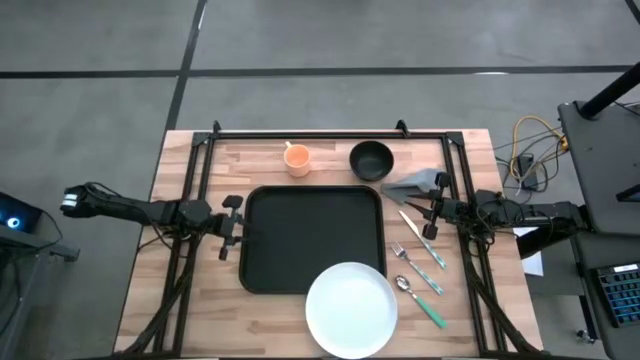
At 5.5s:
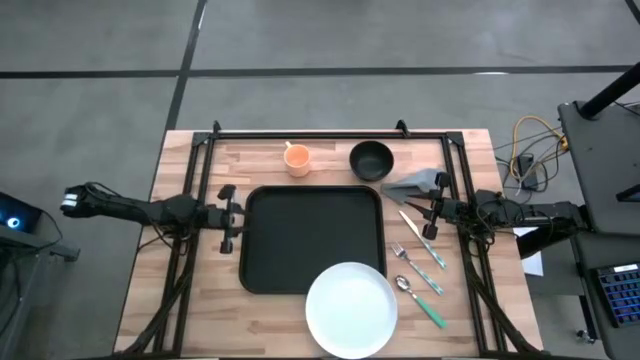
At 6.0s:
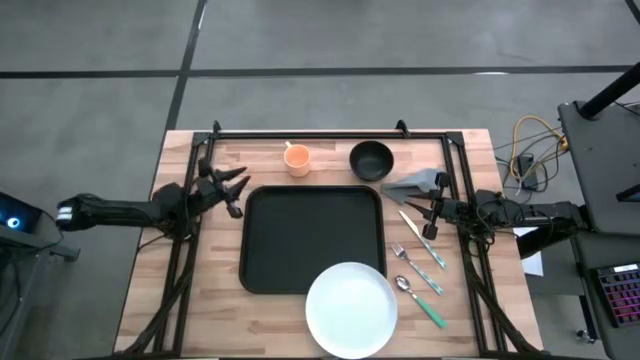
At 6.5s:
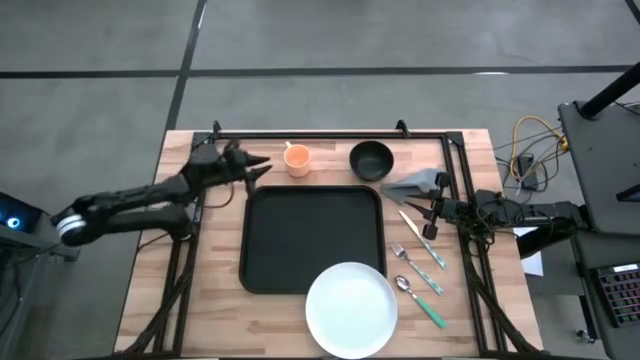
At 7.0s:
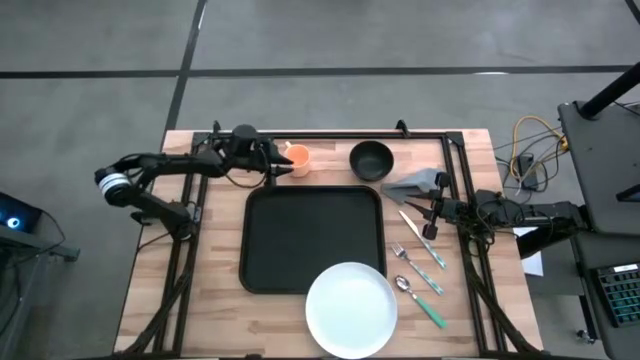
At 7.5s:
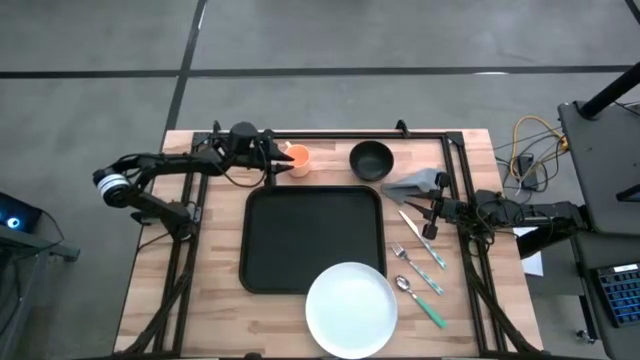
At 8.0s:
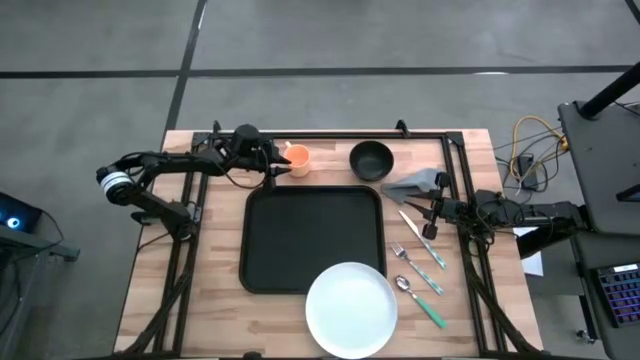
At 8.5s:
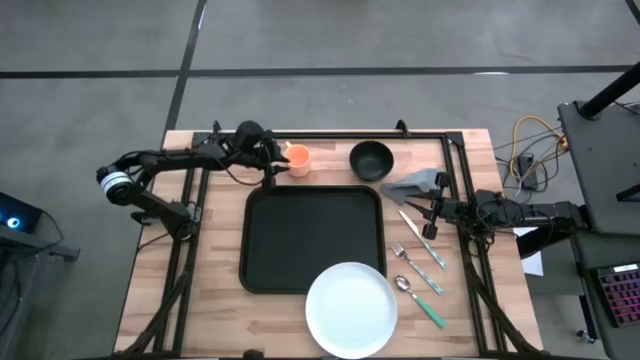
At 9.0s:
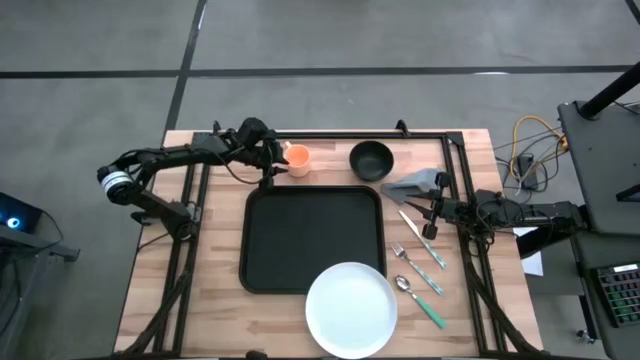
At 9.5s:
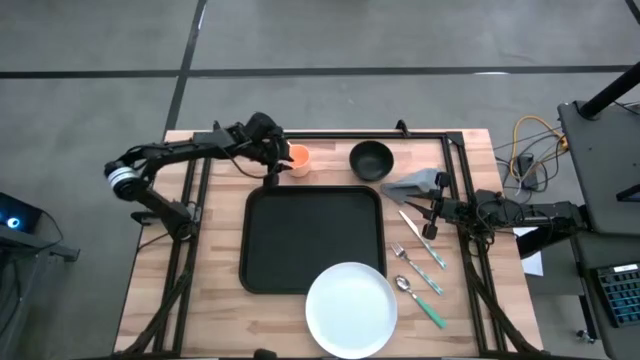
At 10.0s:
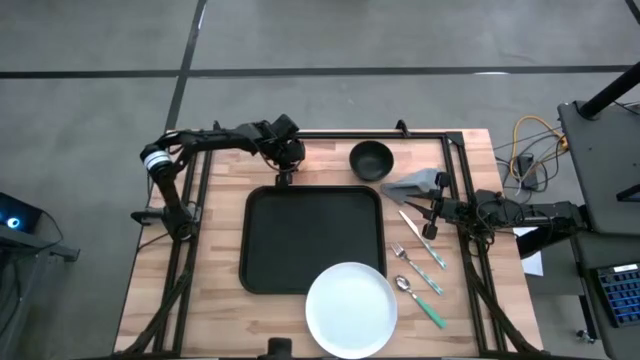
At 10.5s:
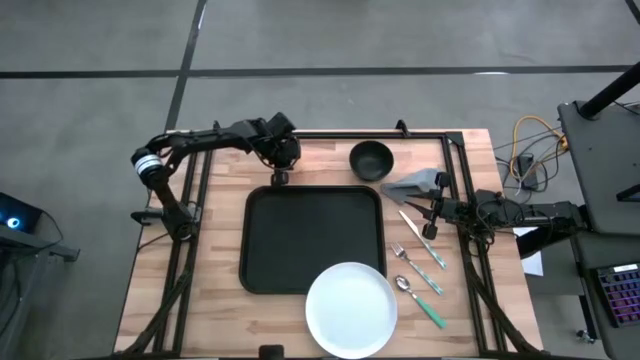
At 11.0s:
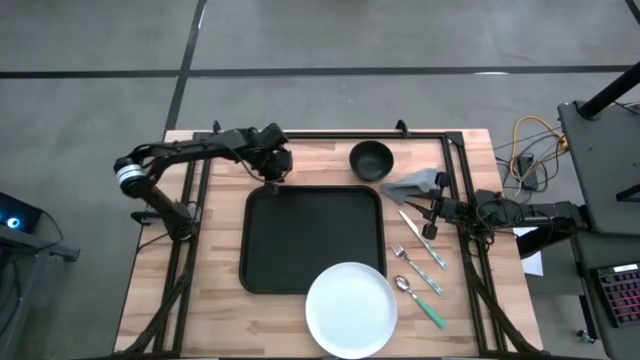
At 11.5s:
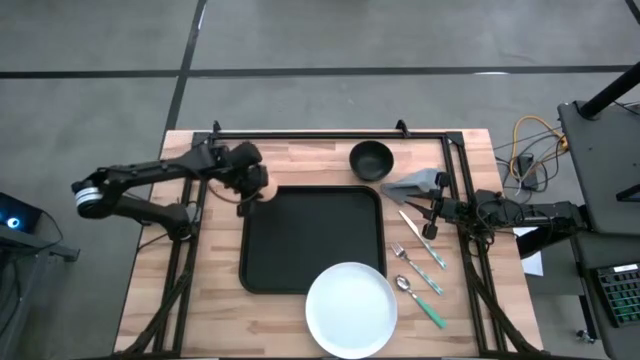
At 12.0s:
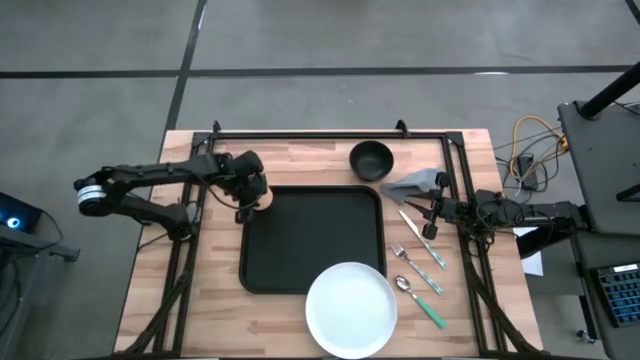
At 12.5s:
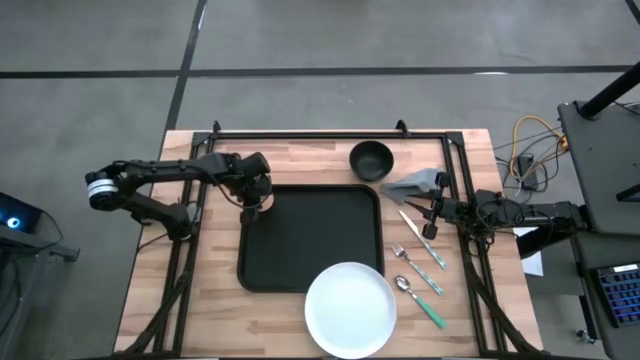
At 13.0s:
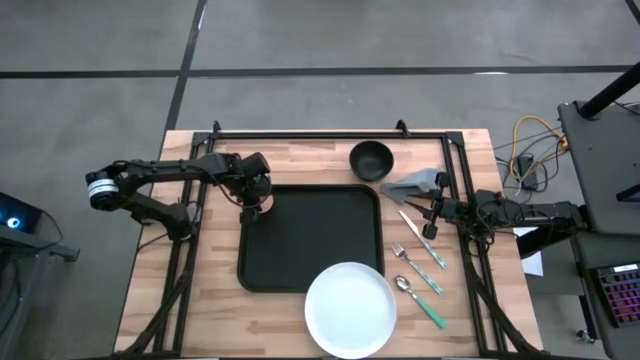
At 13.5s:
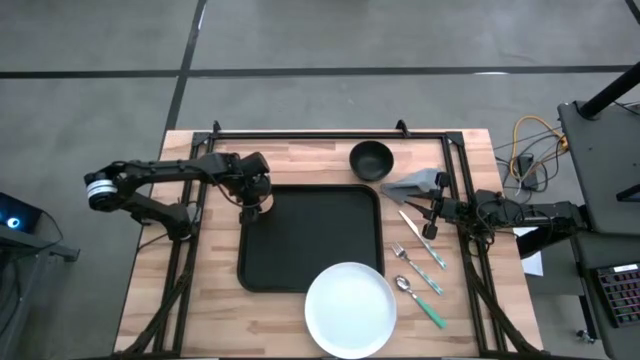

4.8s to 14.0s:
Task: Set up tray
Put the yellow plastic mug on the black serving tray

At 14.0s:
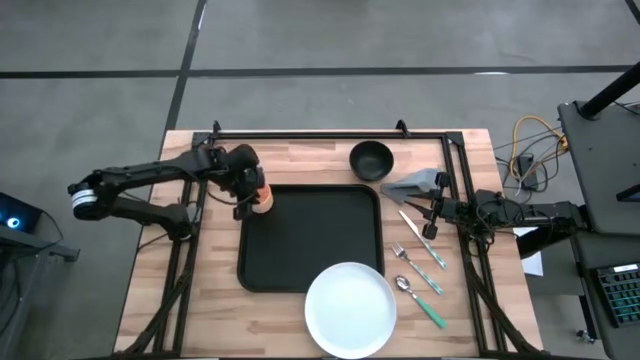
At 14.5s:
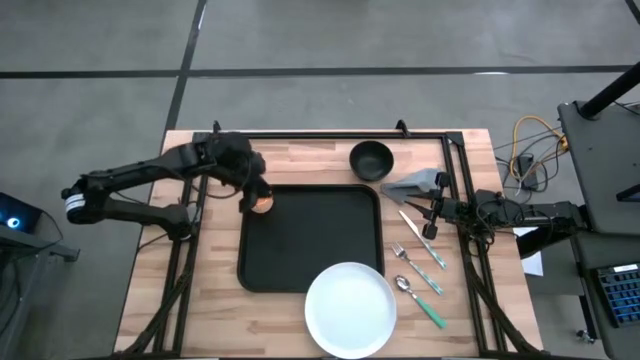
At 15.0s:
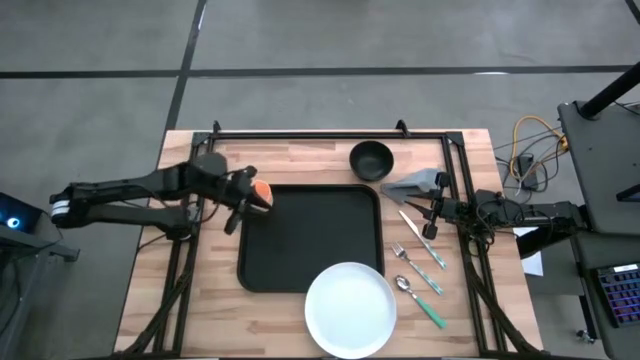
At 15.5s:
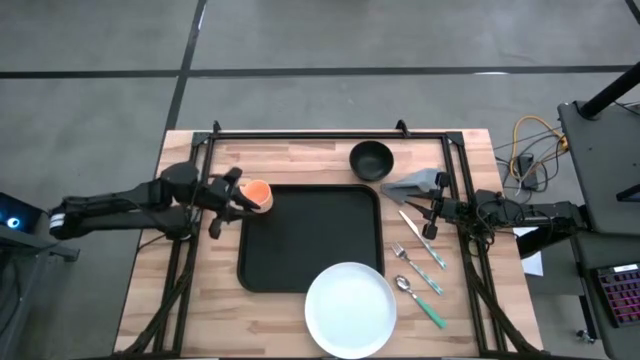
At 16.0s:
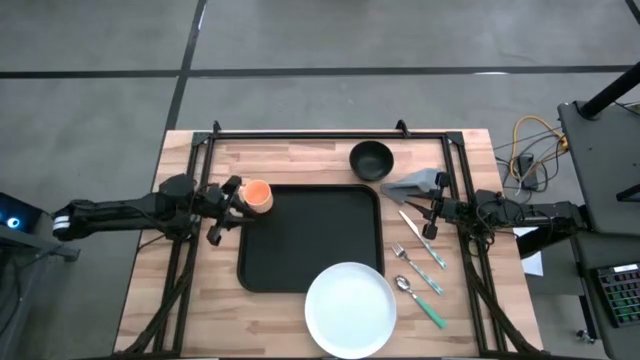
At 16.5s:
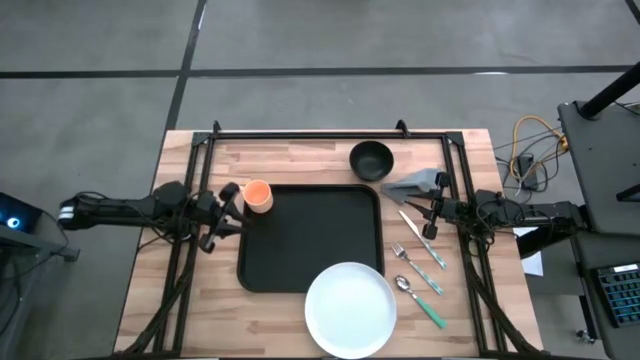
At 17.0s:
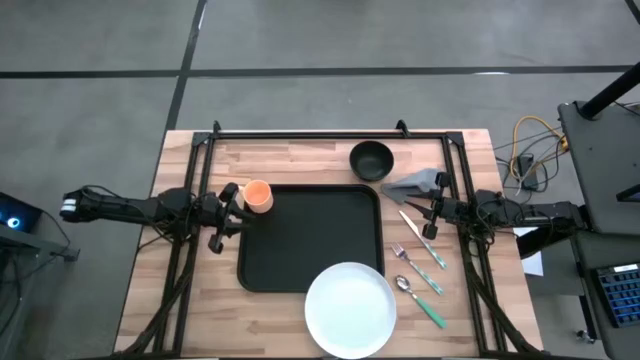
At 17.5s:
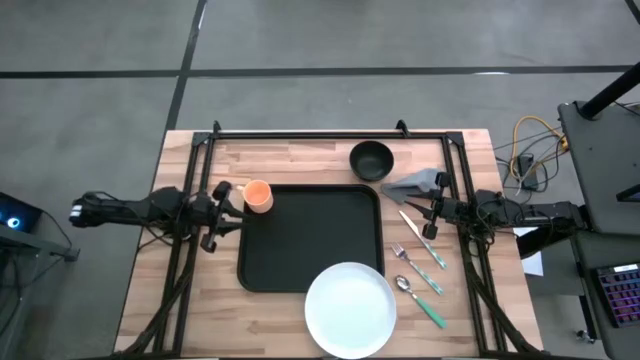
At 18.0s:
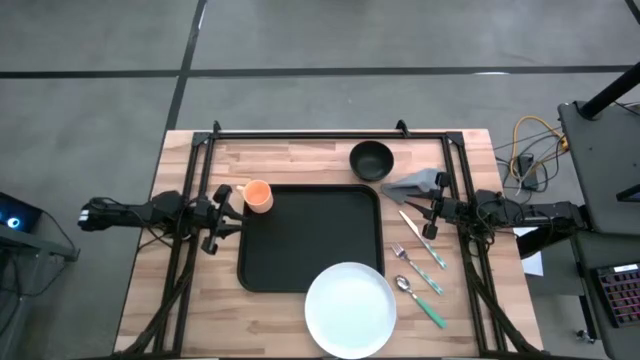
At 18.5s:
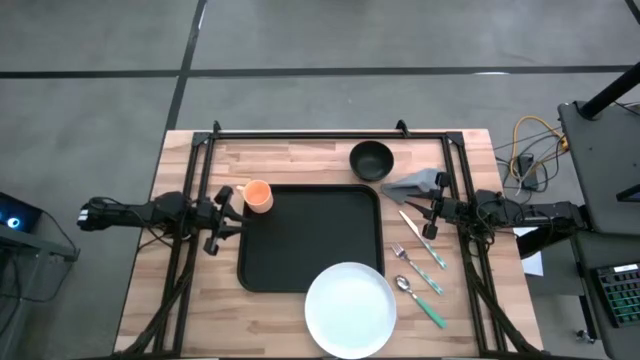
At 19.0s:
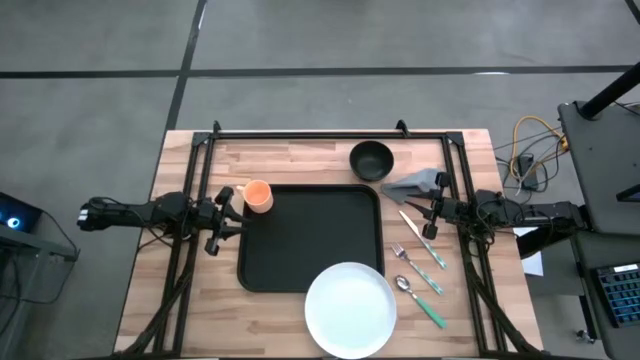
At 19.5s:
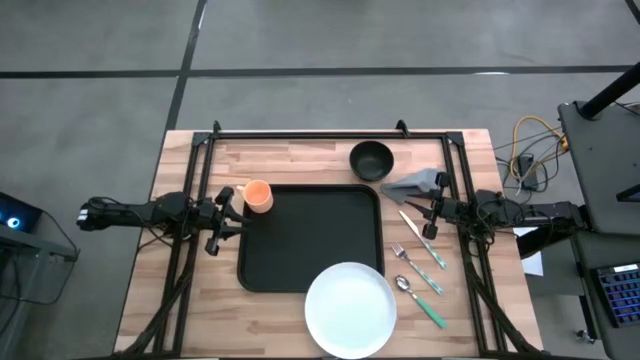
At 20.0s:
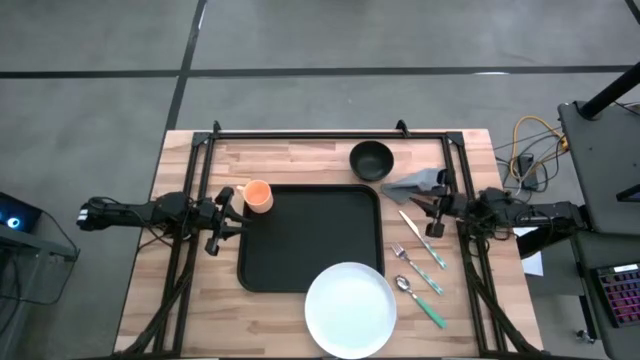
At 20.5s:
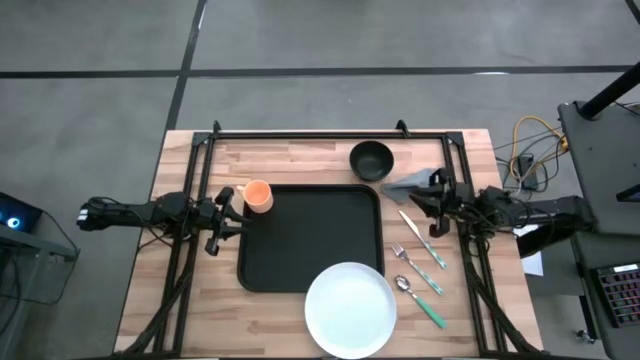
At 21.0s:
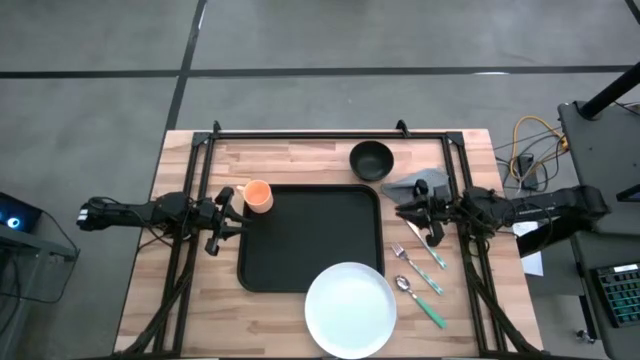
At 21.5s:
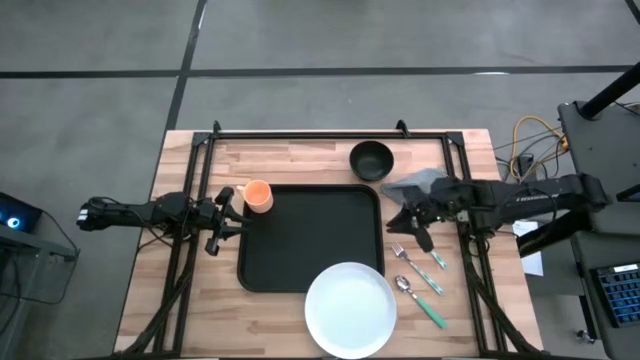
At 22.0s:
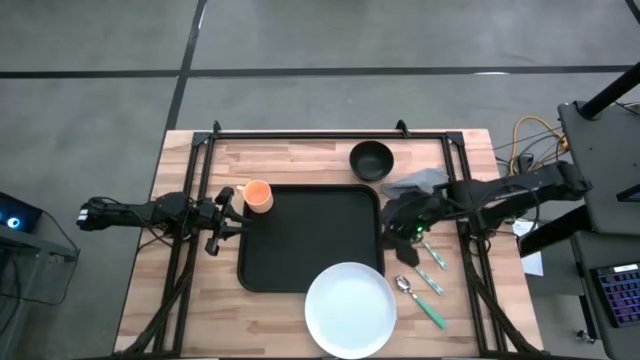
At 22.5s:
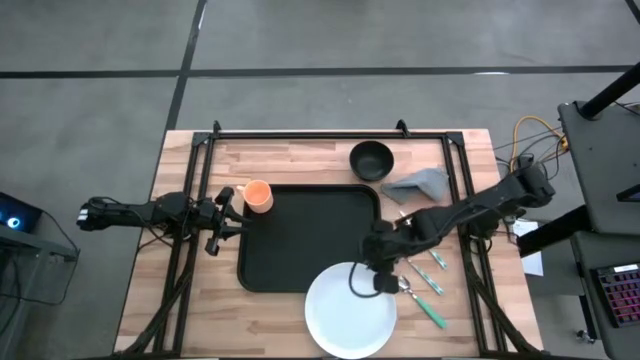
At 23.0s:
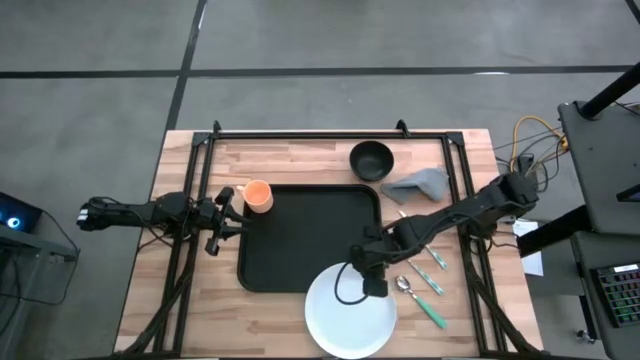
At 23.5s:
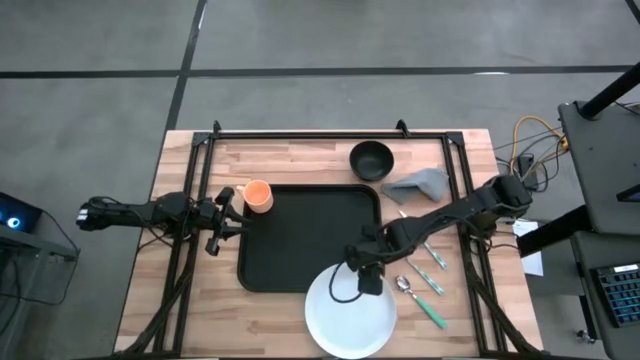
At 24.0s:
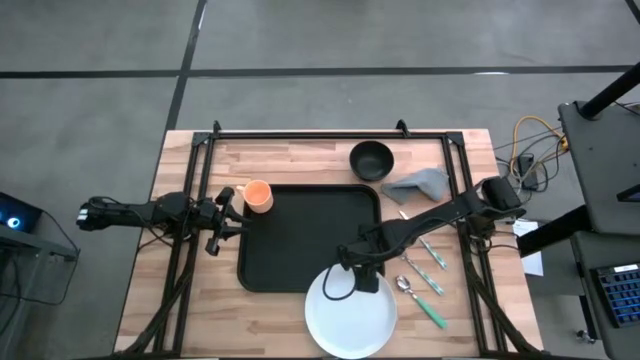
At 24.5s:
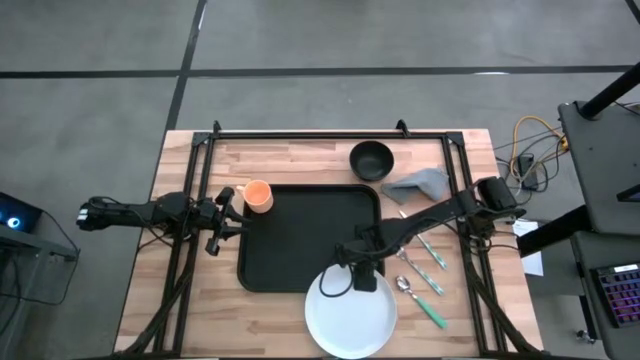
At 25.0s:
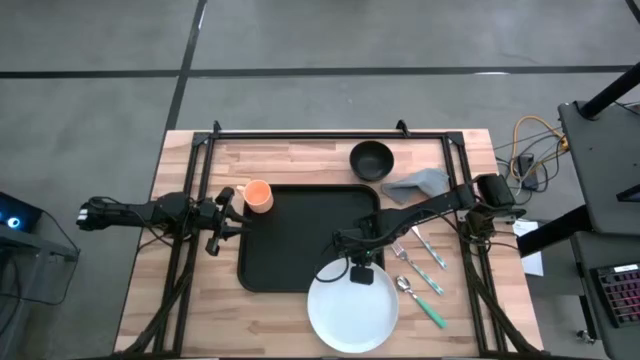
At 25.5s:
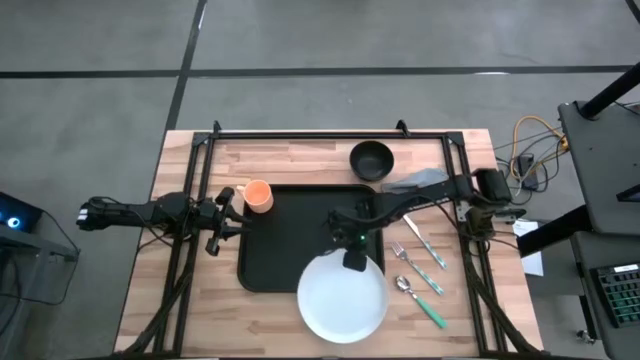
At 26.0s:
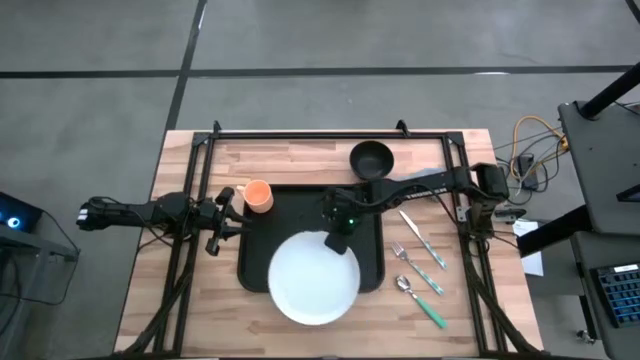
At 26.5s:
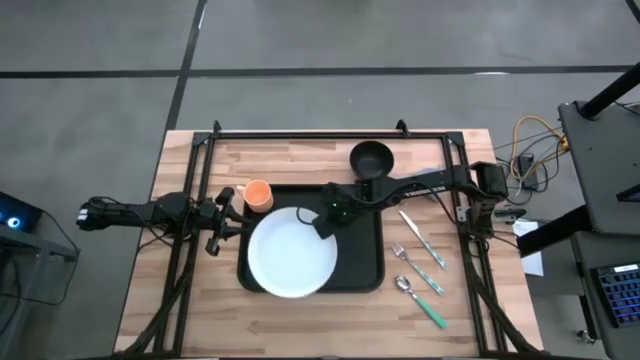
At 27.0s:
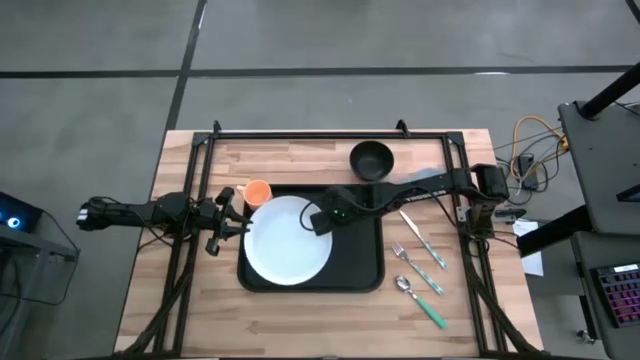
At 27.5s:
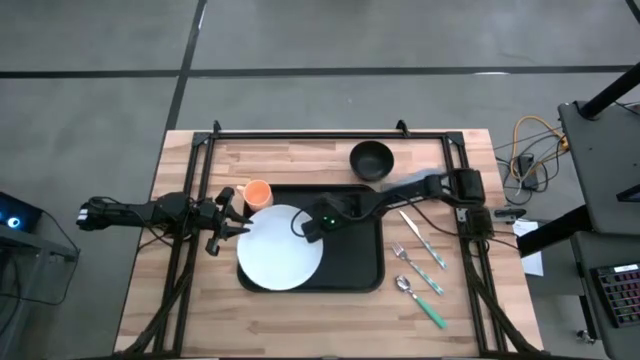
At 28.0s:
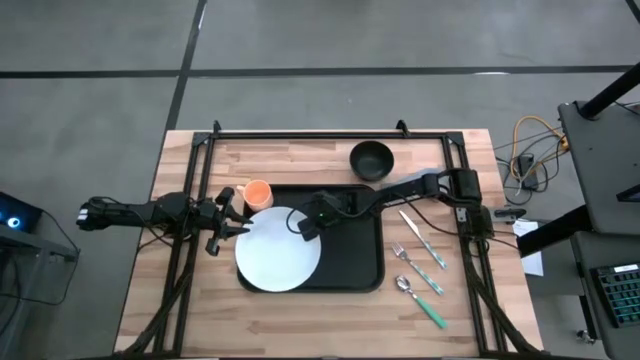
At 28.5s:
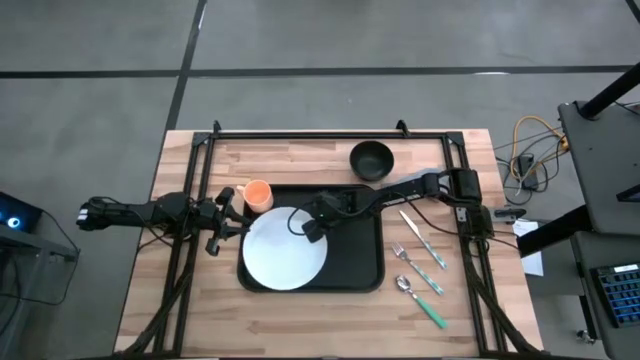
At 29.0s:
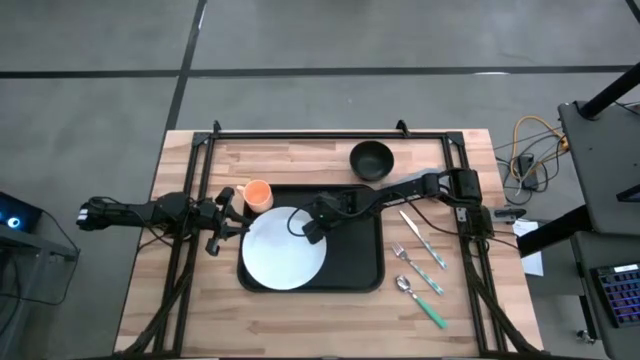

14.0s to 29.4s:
Put the white plate on the black serving tray
